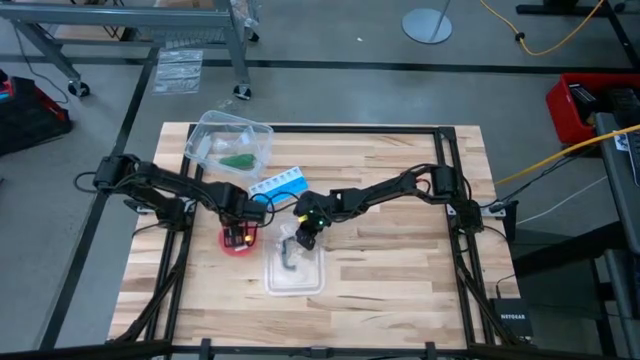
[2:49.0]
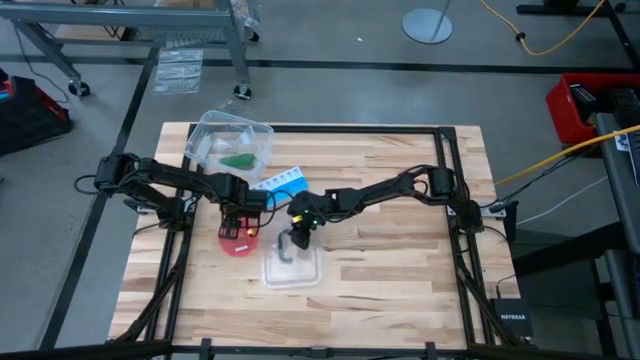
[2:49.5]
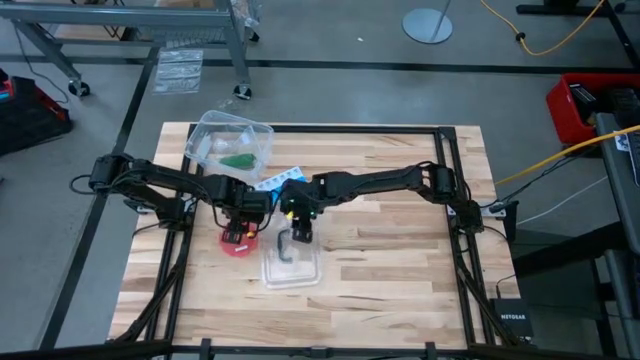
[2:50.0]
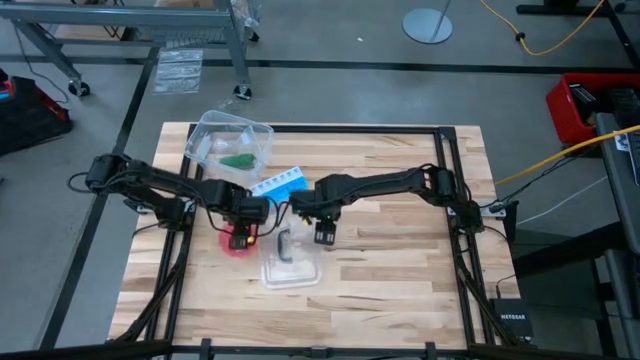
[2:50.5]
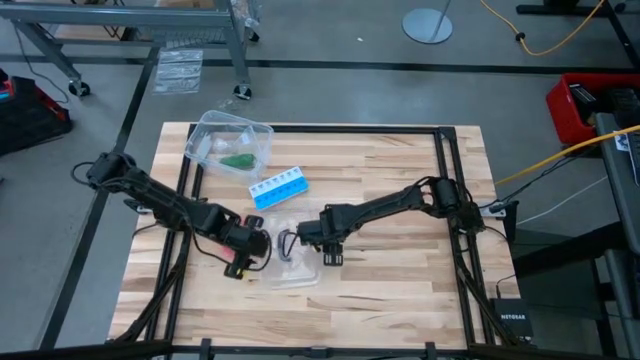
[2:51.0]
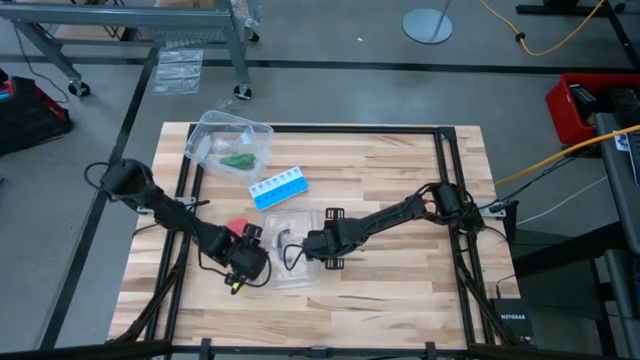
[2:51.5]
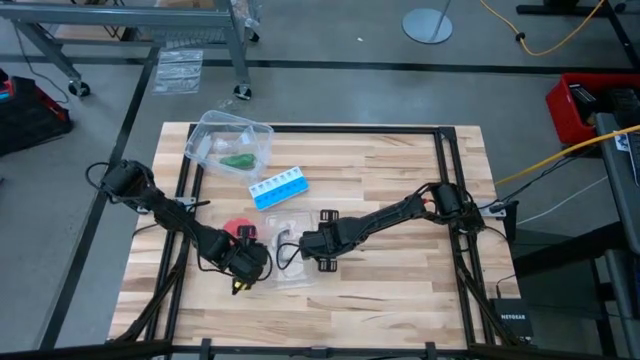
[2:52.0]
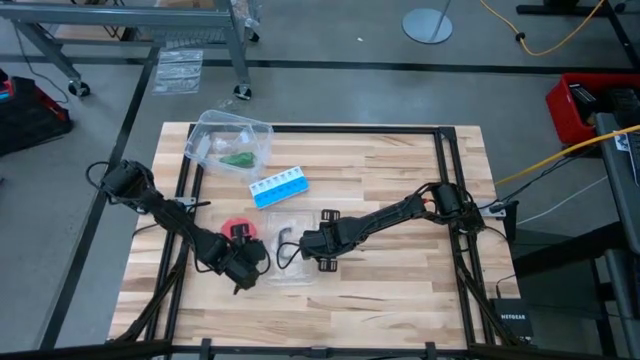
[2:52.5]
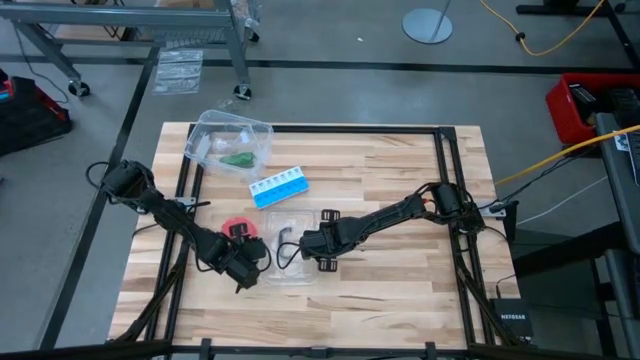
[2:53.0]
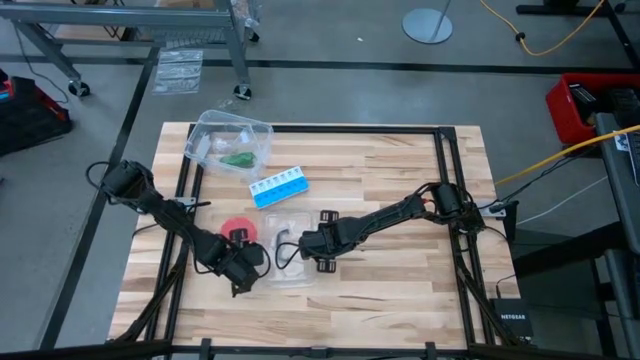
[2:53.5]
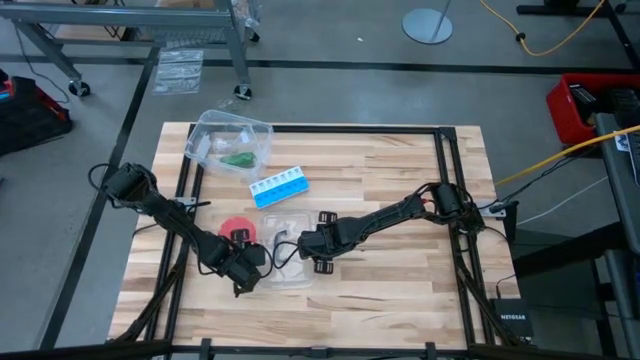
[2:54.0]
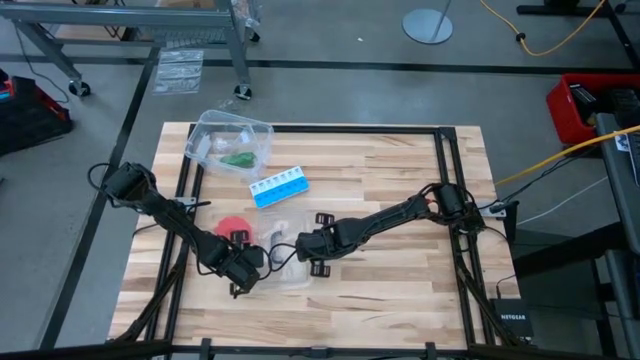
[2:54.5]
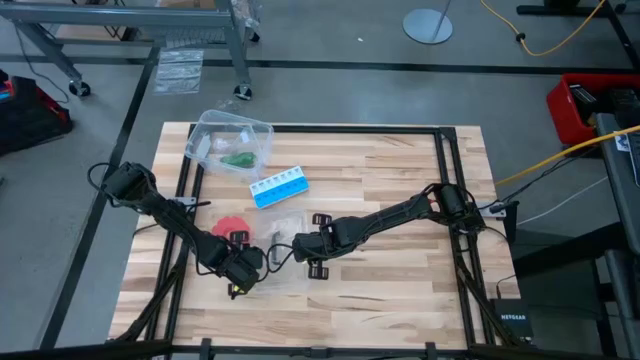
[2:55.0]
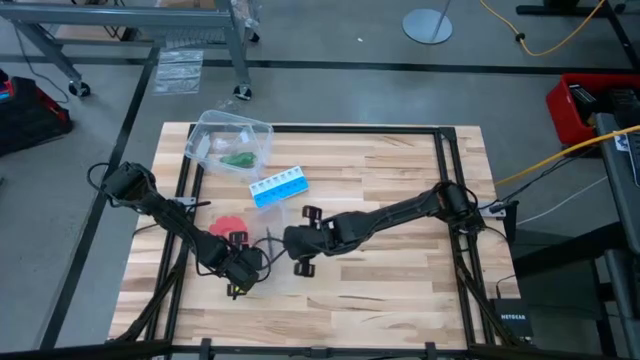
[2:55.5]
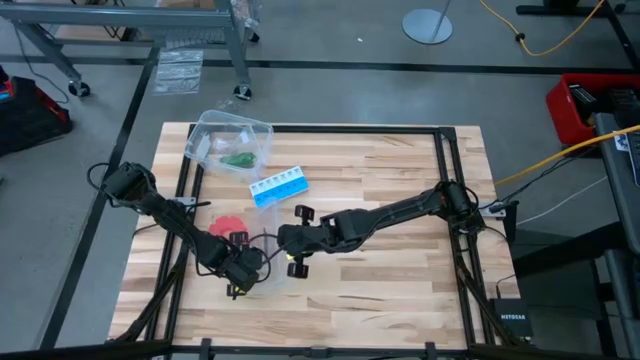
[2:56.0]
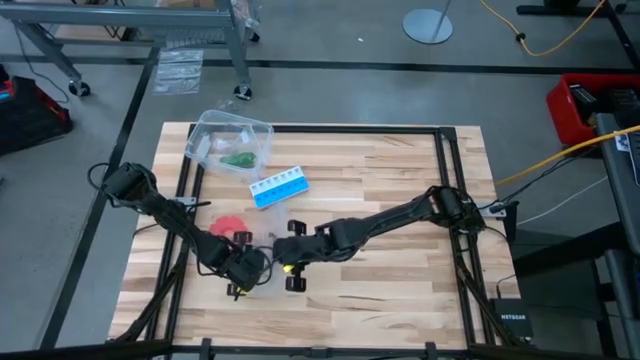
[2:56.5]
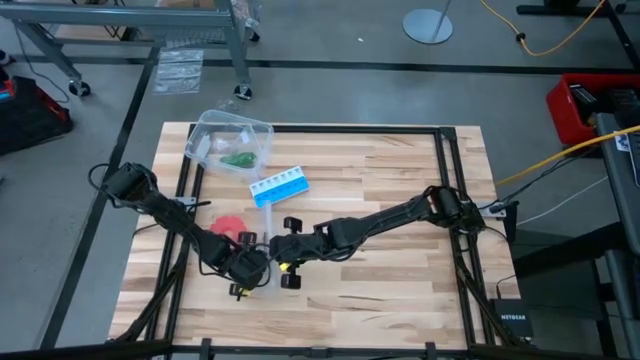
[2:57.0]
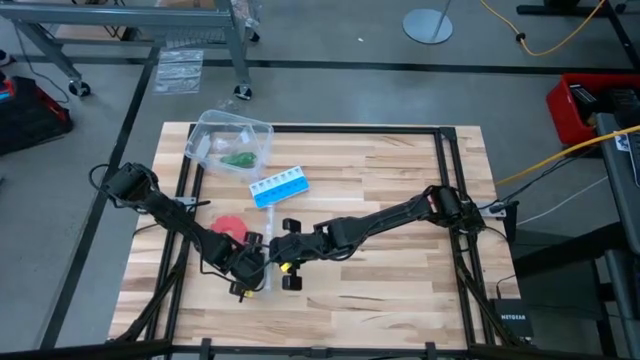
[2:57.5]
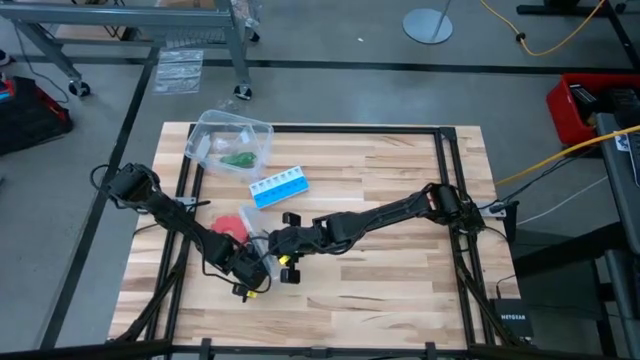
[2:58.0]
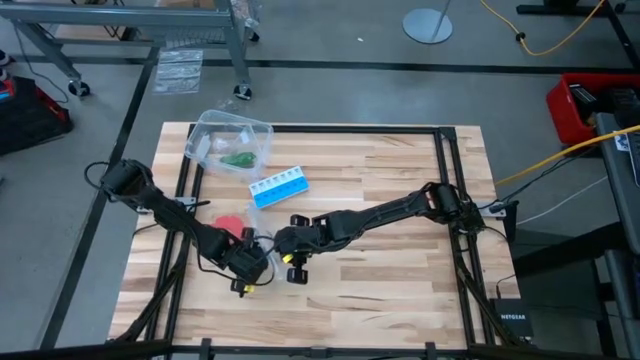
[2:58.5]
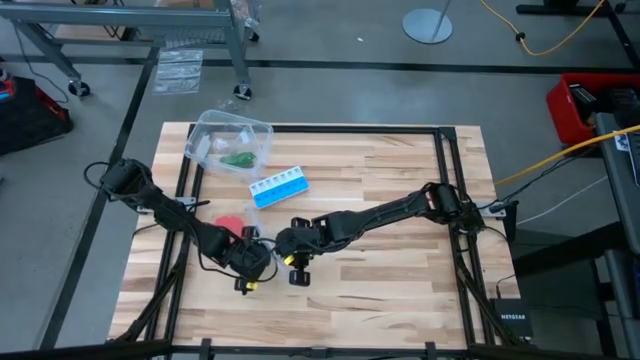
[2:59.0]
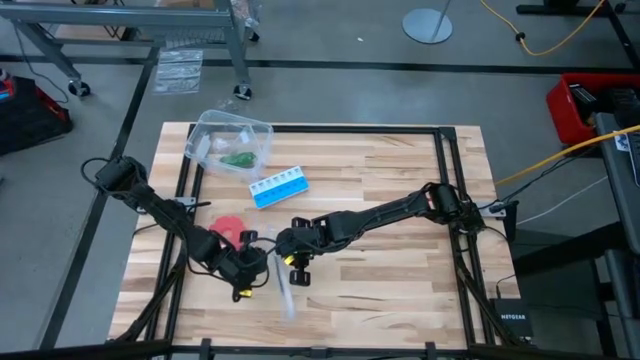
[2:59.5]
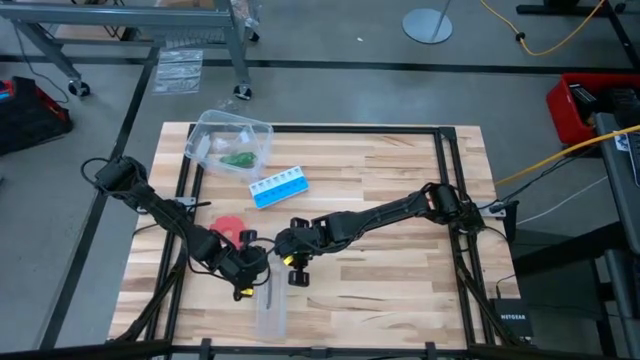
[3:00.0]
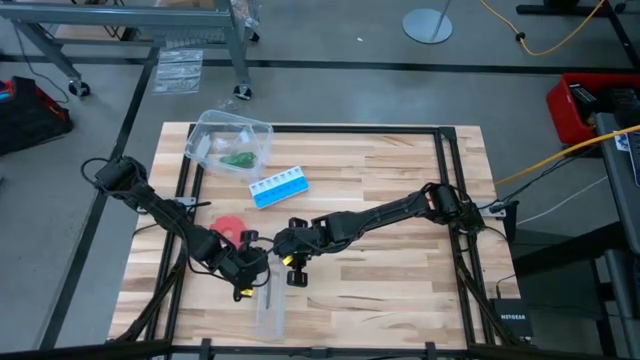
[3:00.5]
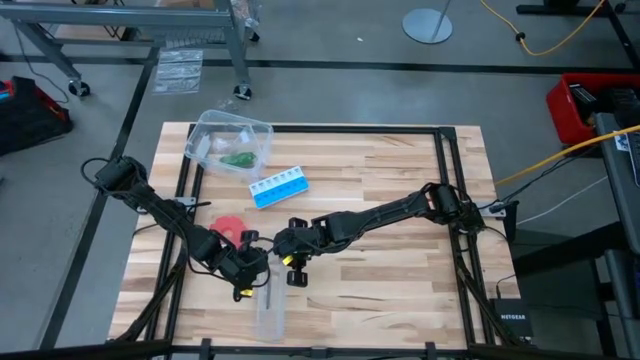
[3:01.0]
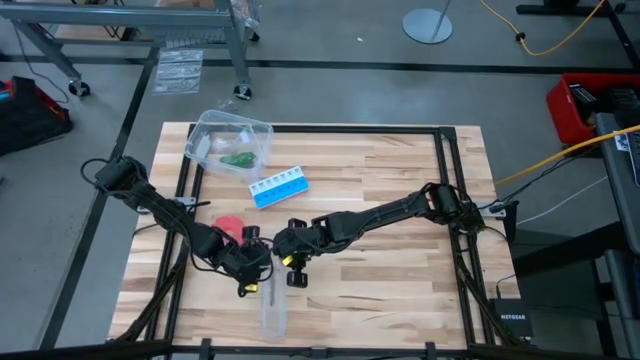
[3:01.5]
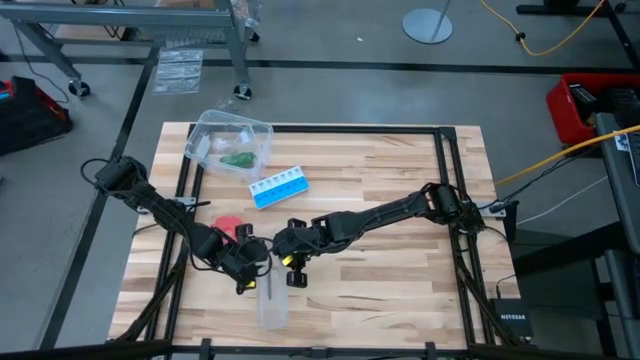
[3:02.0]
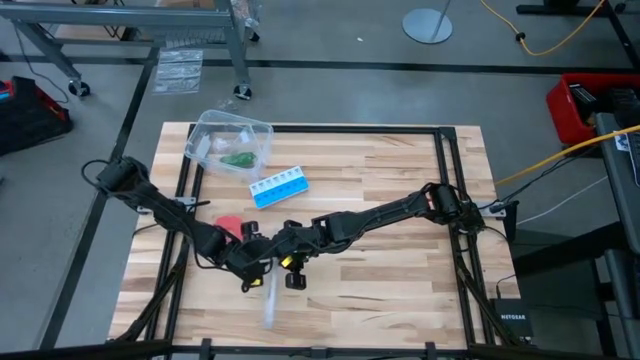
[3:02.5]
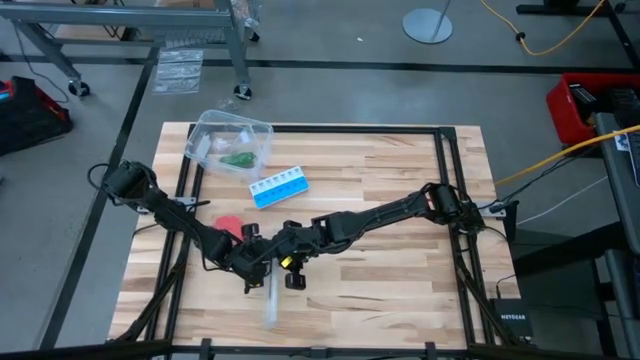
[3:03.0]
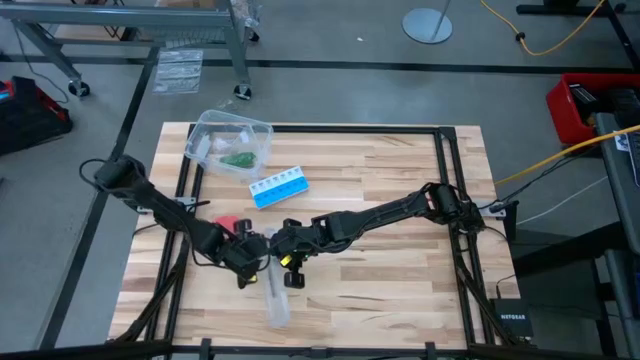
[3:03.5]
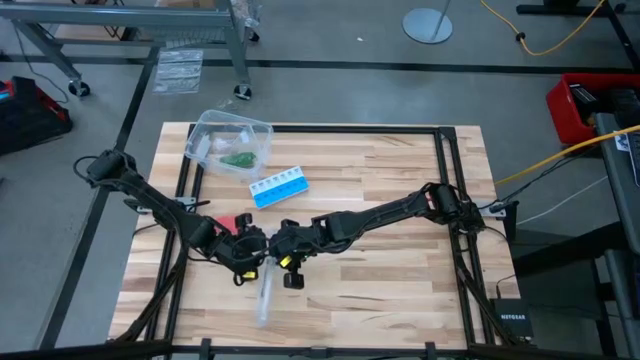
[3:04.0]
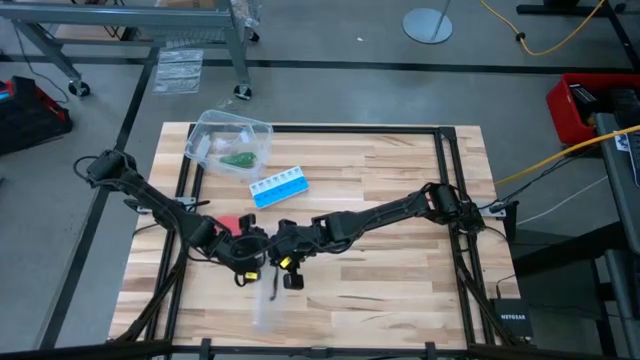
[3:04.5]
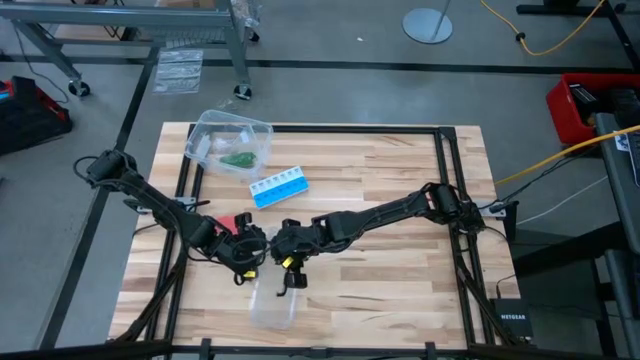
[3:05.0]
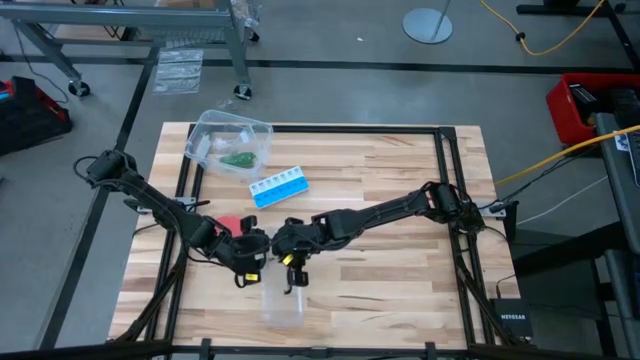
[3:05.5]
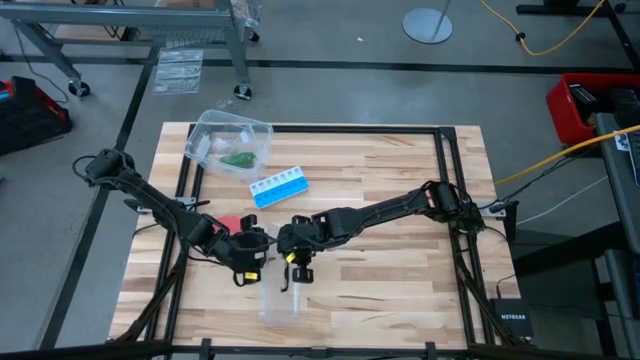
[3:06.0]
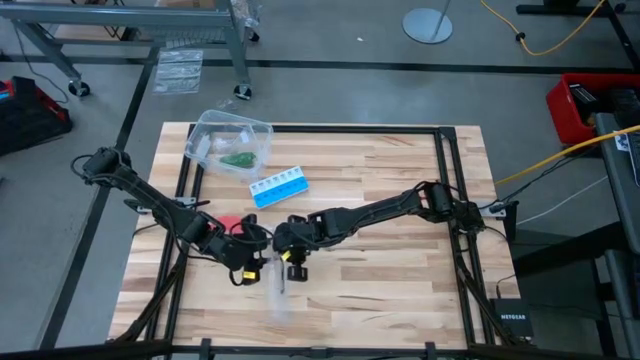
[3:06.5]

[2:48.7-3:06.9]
Task: Roll bandage
Close the transparent container

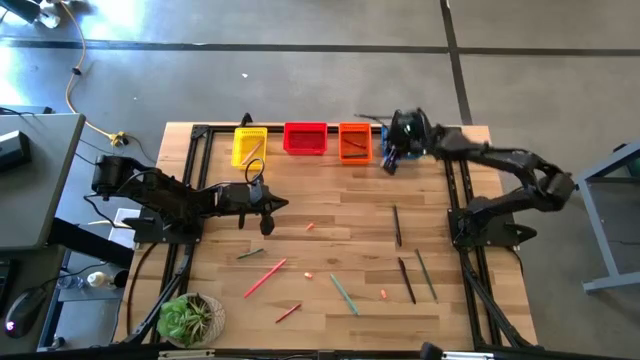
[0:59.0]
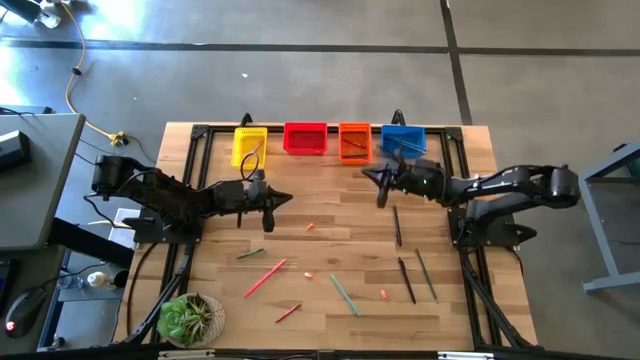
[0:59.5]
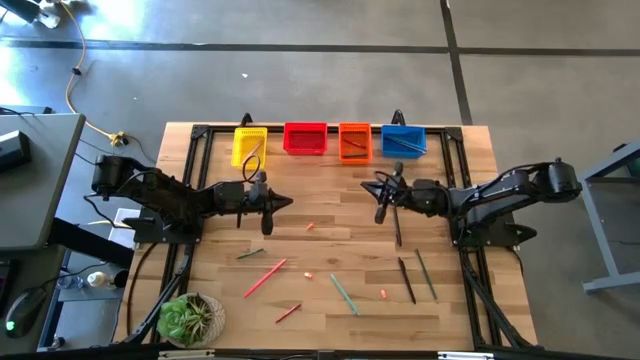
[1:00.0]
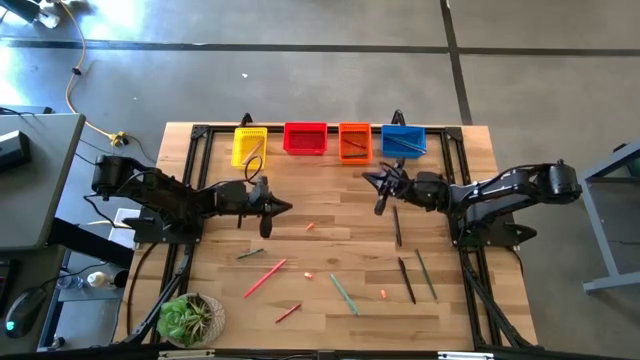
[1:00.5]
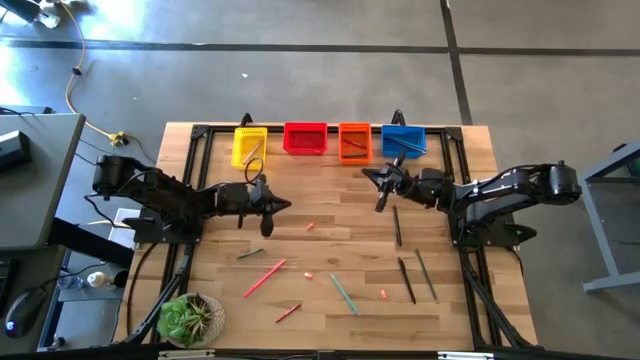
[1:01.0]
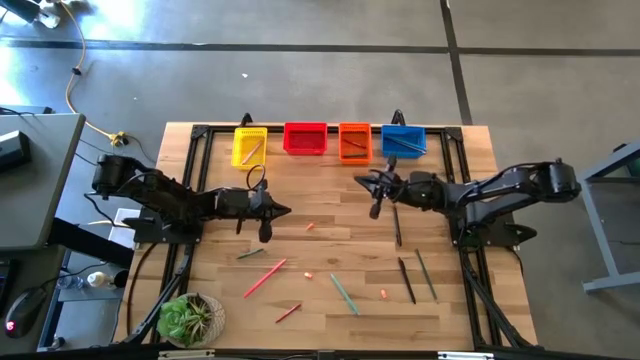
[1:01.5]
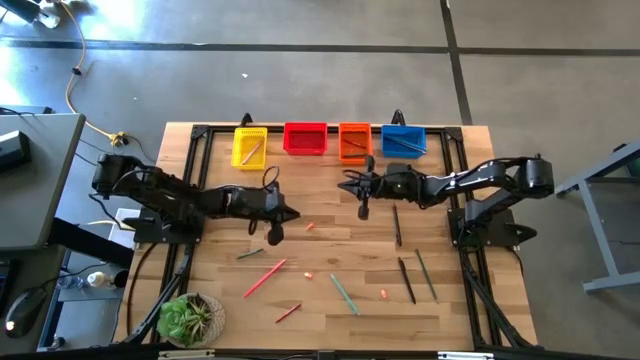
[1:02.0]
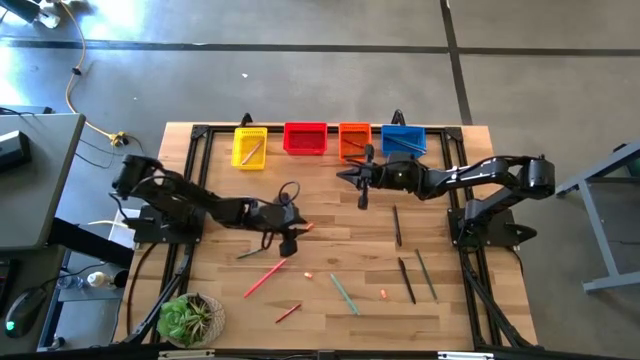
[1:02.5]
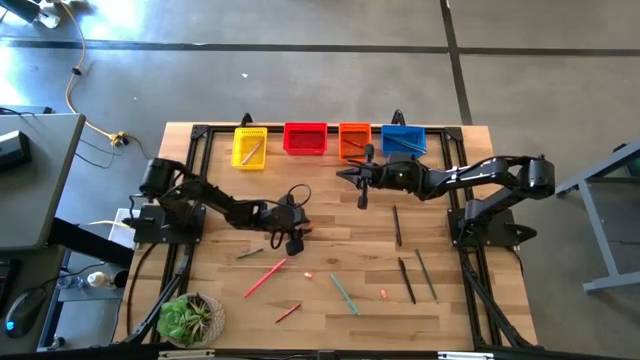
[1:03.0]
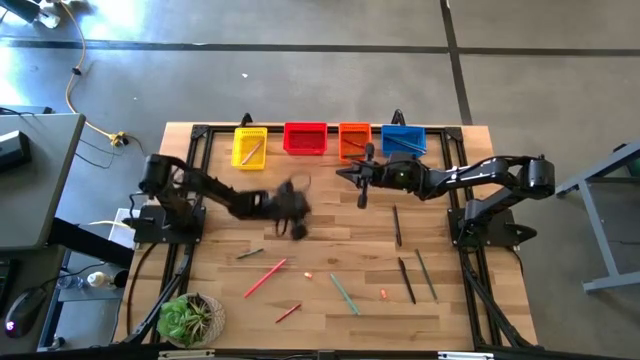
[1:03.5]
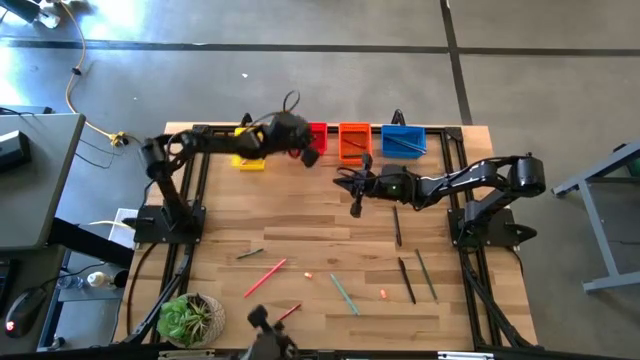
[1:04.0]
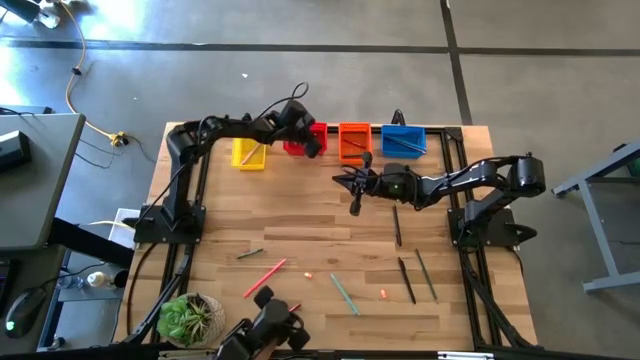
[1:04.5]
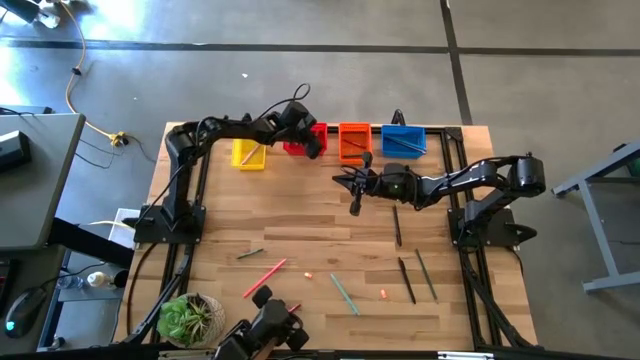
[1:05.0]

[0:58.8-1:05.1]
Task: Sort crayons/erasers/pens/pencils in bins
Put the orange eraser into the red basket
